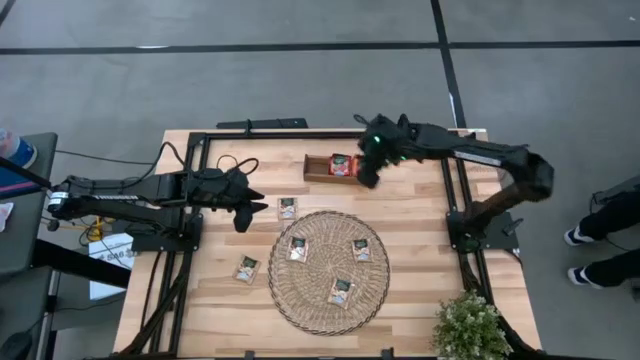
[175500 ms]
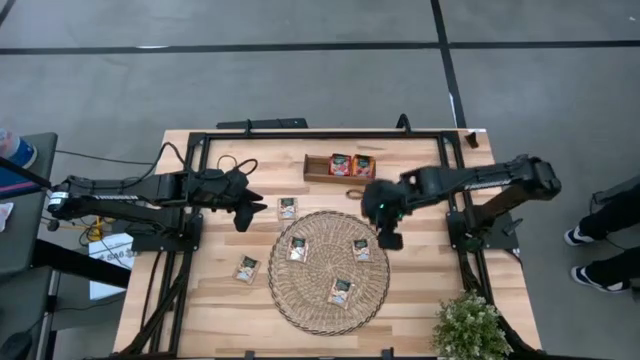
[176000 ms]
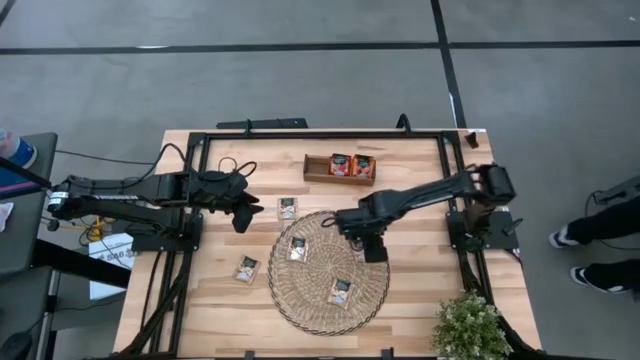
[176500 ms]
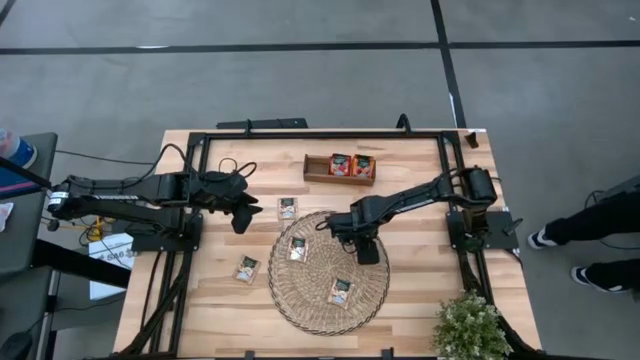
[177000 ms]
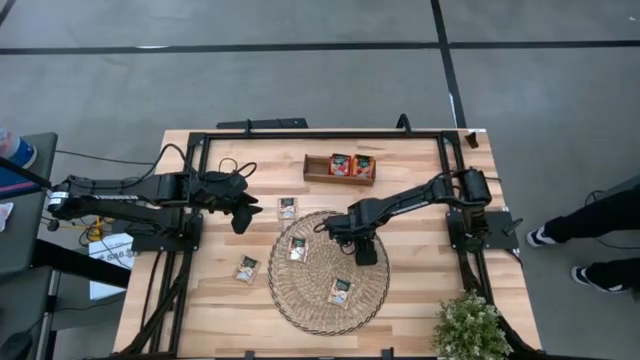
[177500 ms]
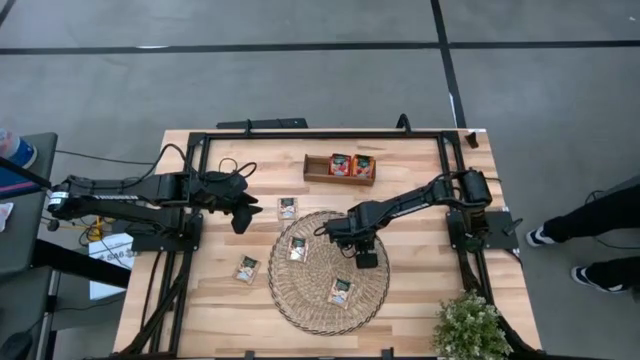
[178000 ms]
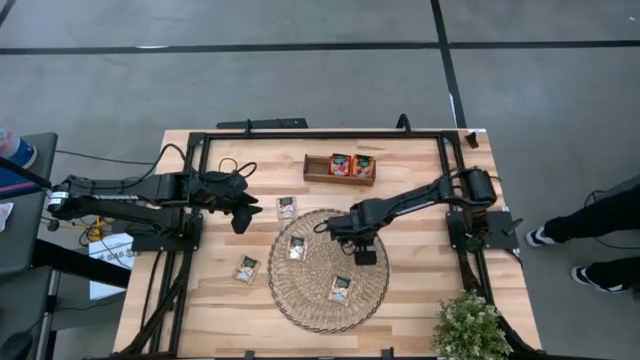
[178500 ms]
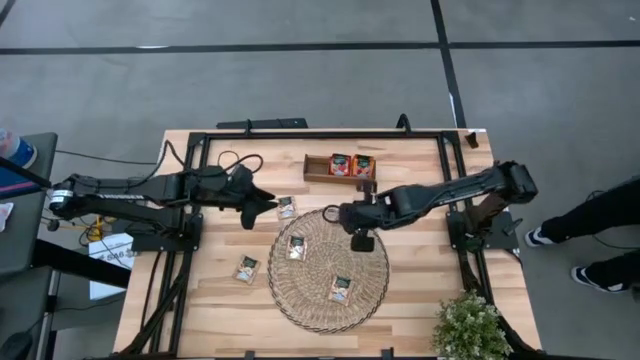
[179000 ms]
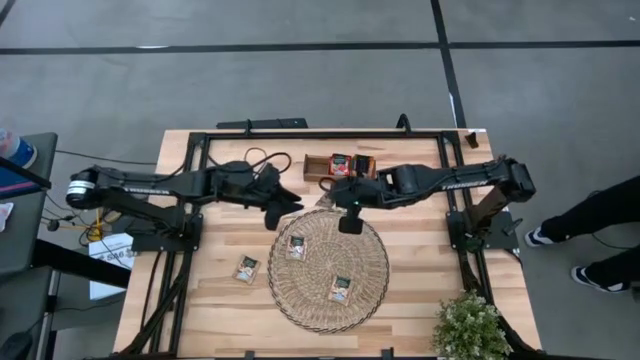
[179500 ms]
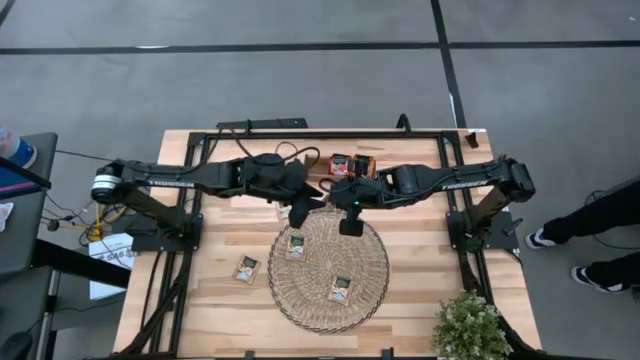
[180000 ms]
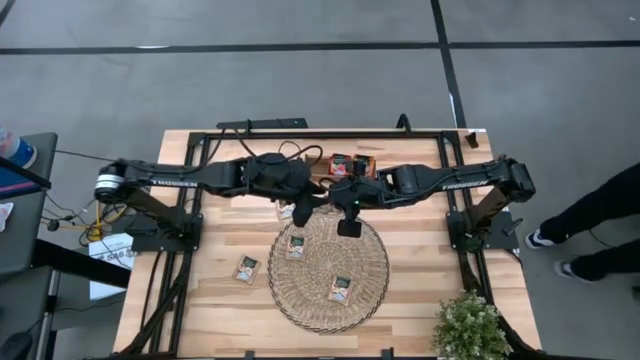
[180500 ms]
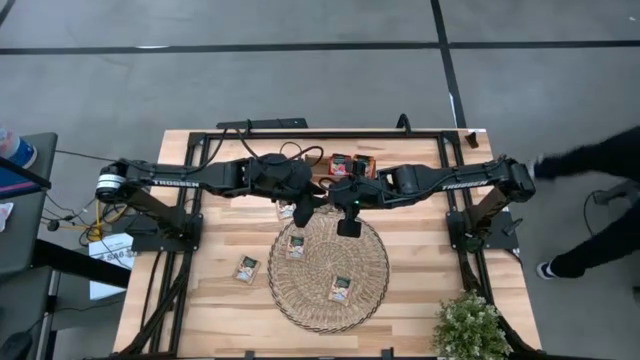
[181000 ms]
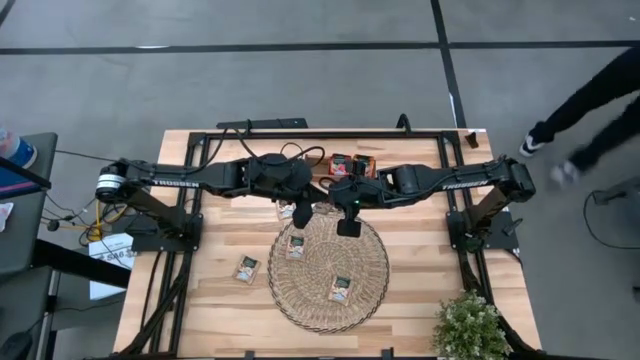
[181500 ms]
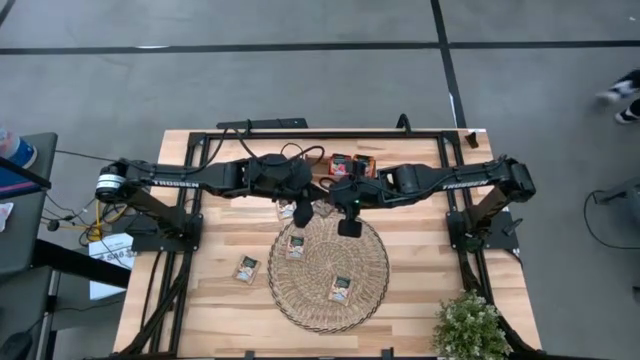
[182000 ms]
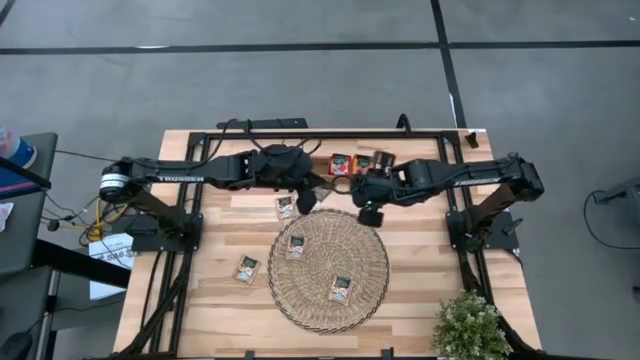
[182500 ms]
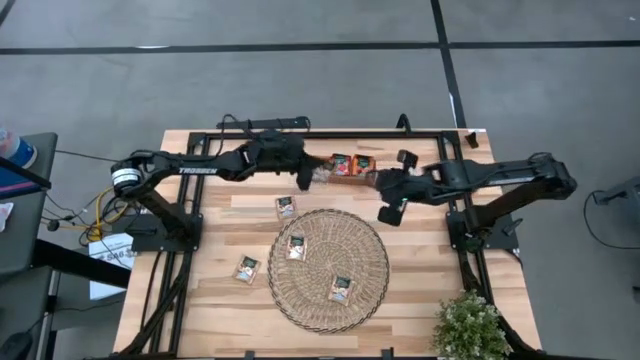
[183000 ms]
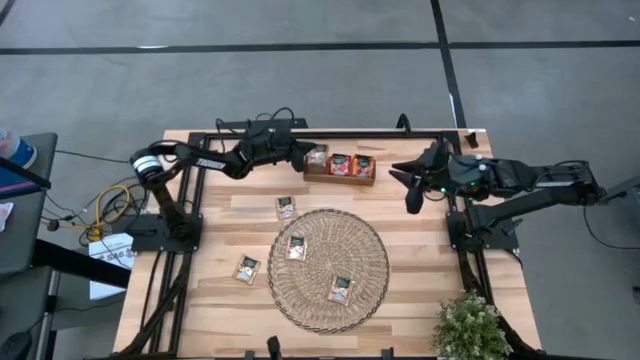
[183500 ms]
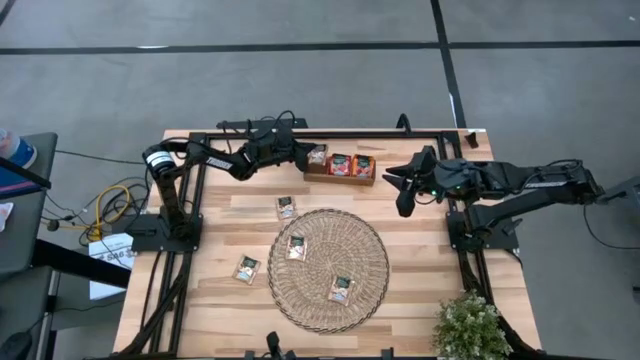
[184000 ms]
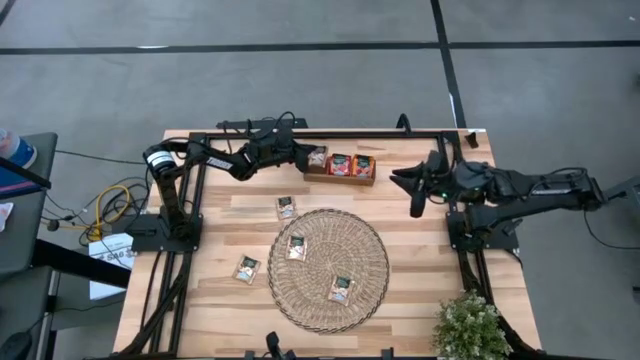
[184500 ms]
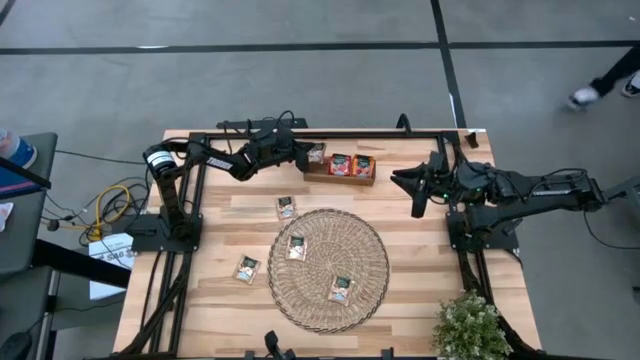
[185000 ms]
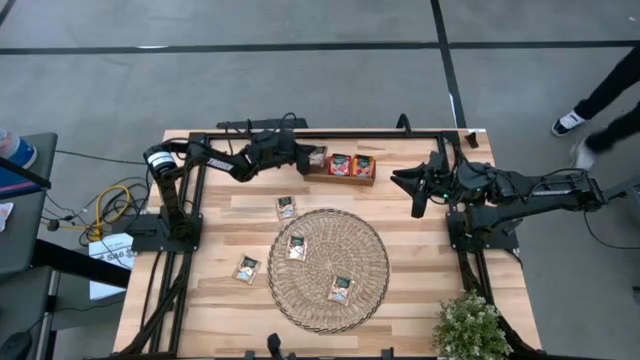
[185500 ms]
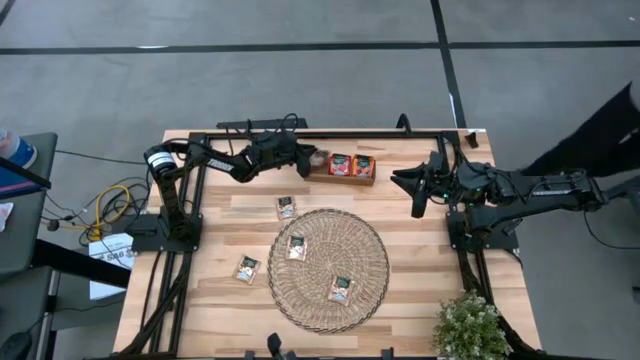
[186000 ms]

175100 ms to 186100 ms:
Task: Pick & Place Tea
Put the brown tea bag into the left section of the wooden organizer

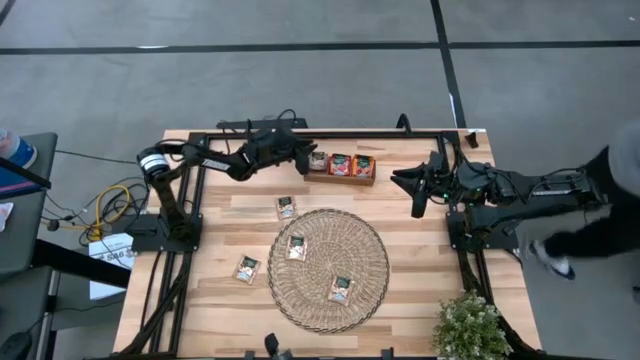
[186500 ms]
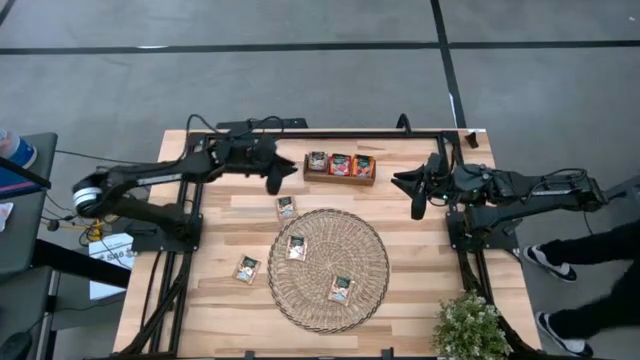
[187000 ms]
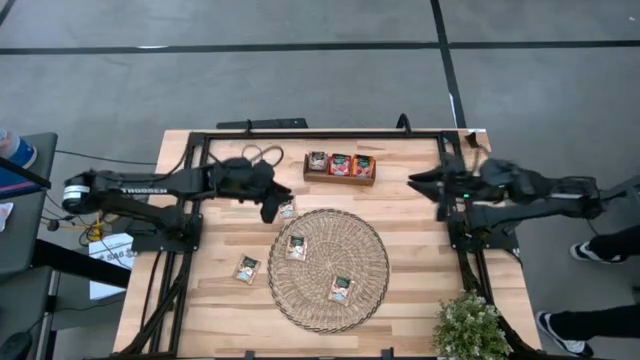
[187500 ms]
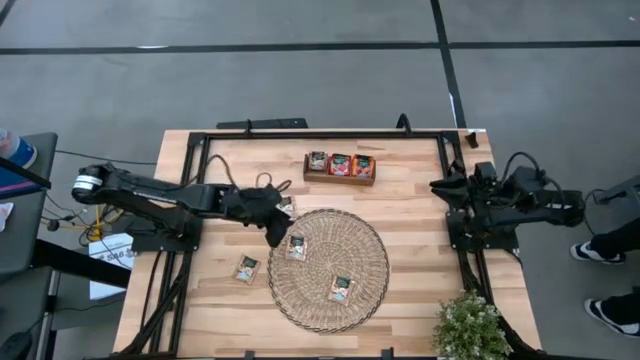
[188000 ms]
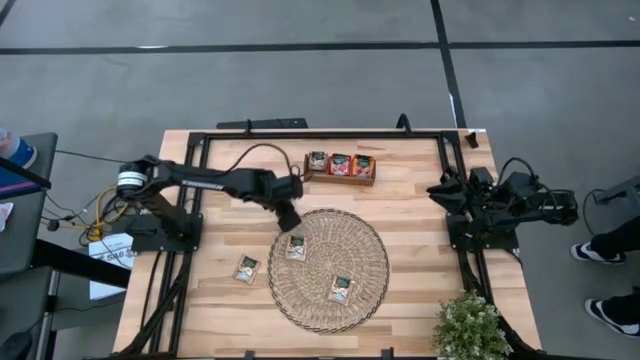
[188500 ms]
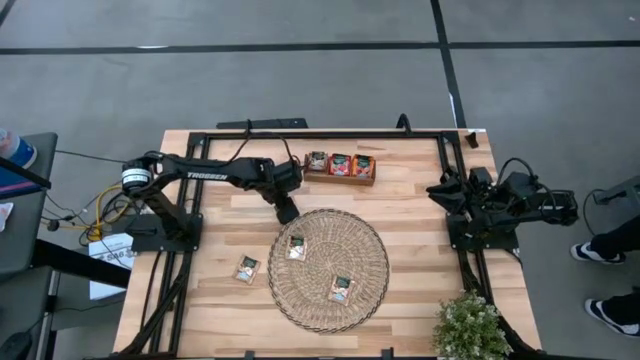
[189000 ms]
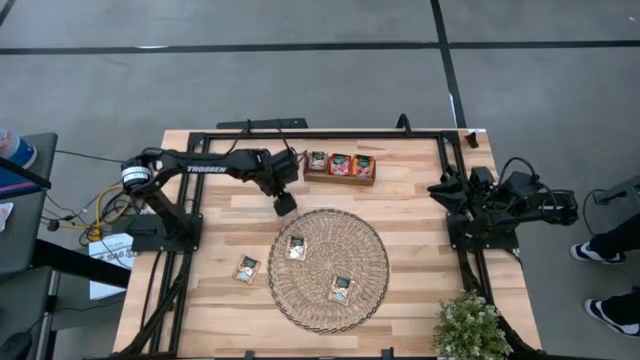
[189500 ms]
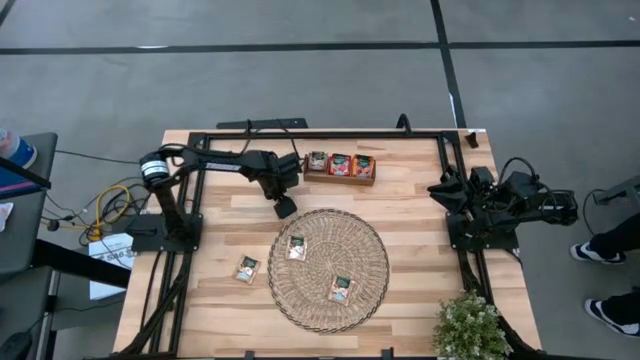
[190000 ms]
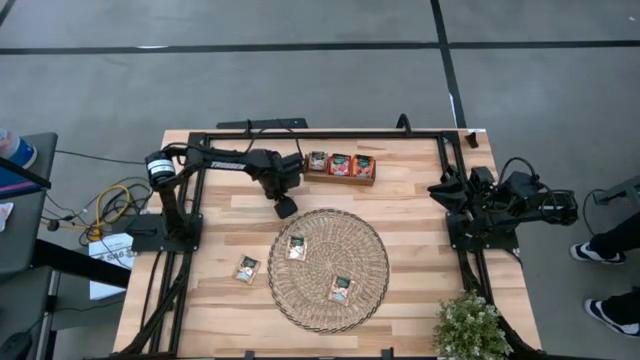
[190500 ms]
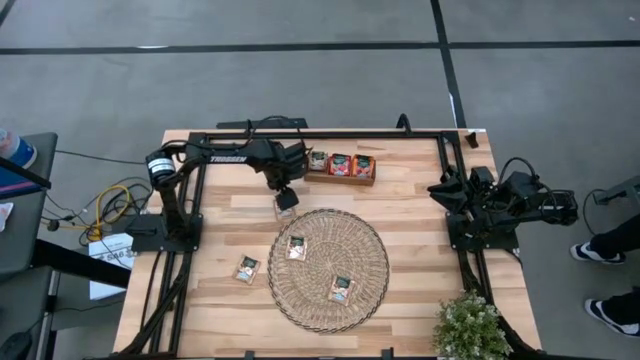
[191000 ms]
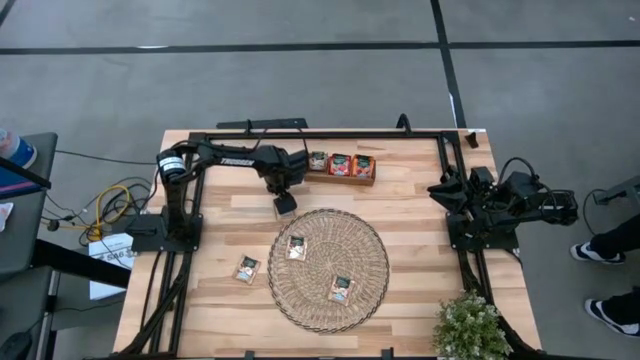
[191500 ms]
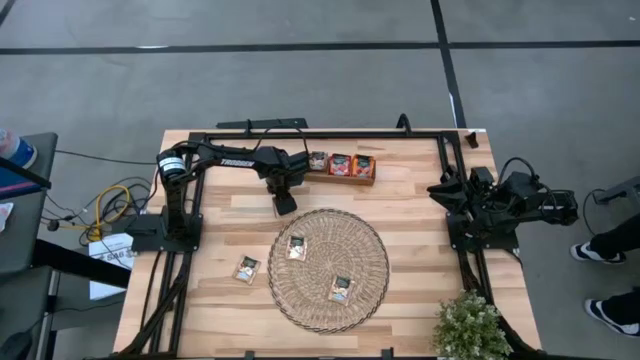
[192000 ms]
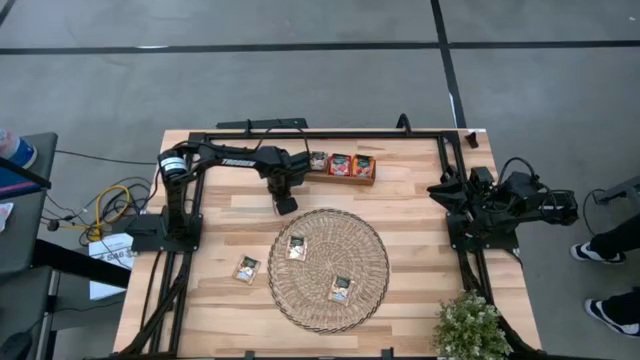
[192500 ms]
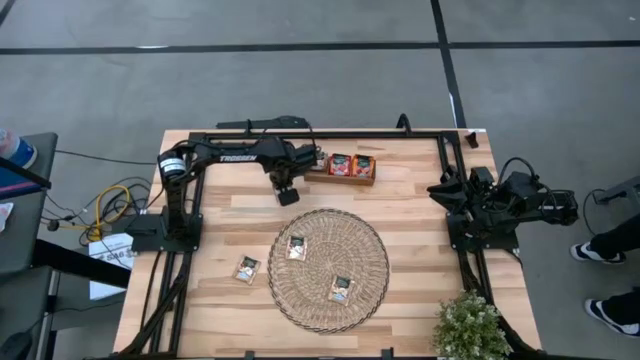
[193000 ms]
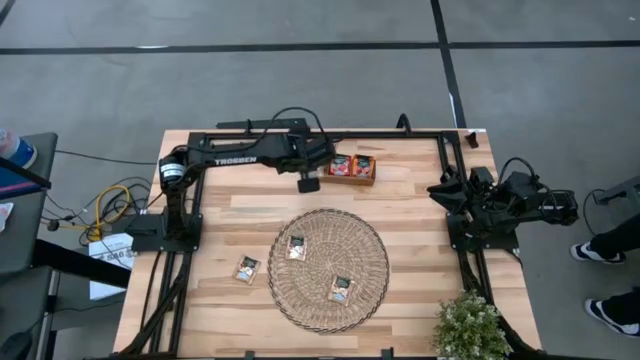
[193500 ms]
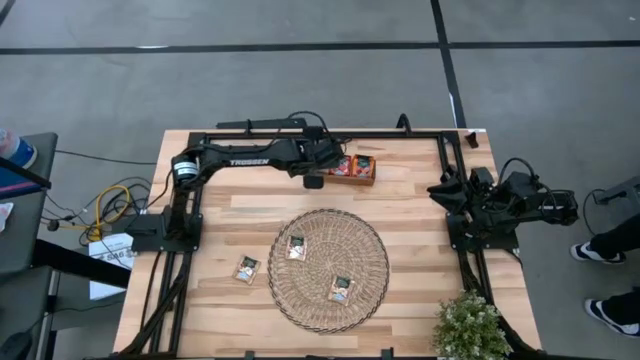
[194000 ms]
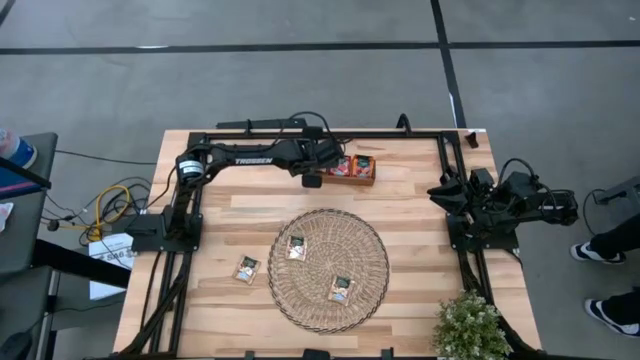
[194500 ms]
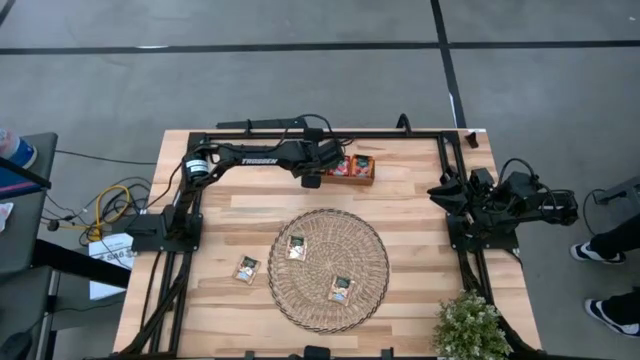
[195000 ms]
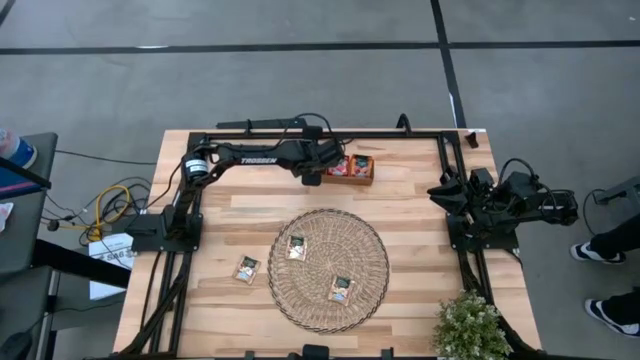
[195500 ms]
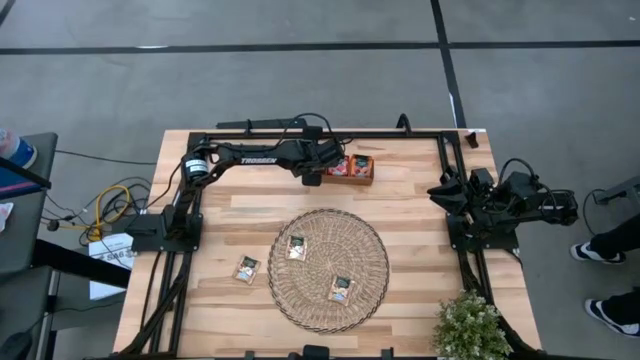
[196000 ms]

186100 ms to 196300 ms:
Put the brown tea bag into the left section of the wooden organizer
